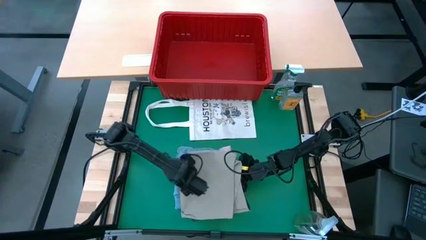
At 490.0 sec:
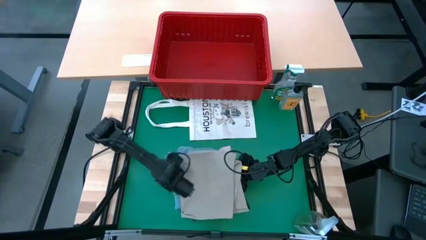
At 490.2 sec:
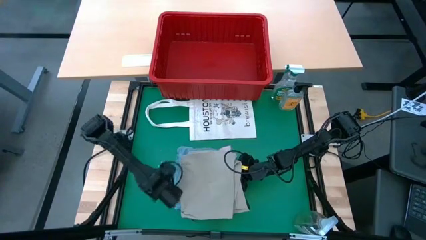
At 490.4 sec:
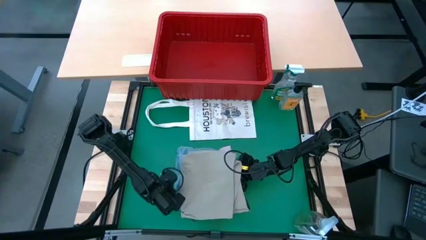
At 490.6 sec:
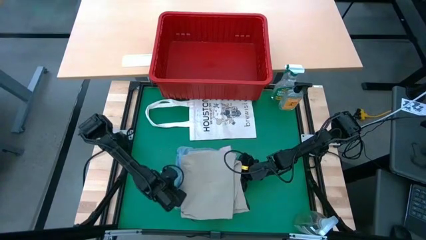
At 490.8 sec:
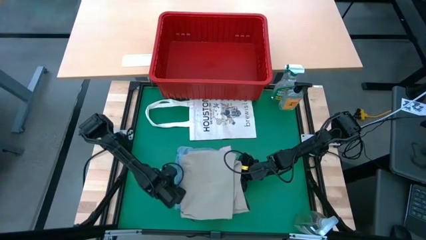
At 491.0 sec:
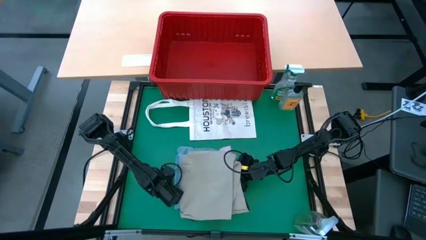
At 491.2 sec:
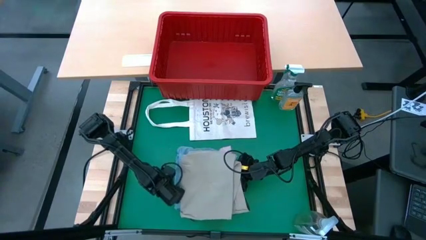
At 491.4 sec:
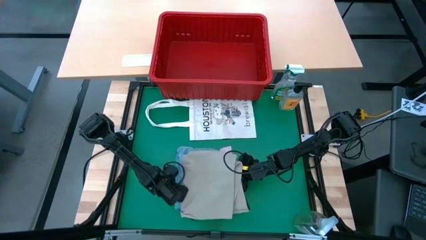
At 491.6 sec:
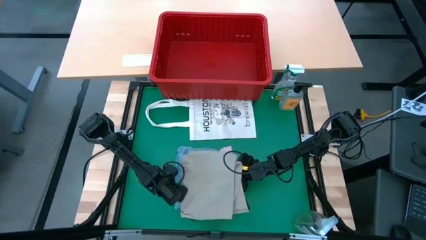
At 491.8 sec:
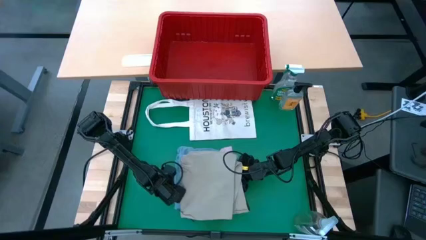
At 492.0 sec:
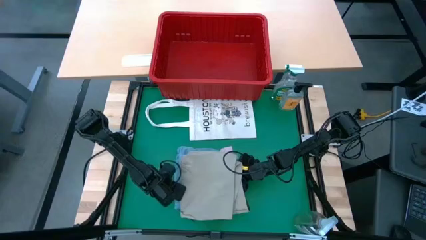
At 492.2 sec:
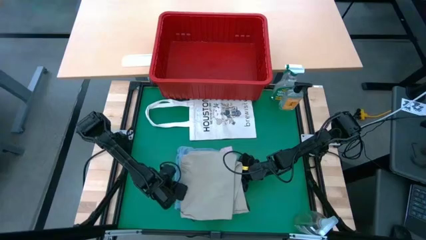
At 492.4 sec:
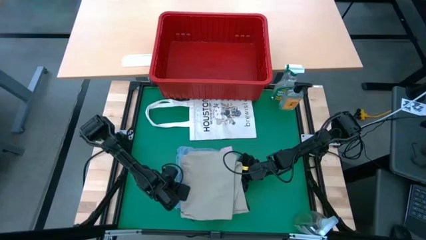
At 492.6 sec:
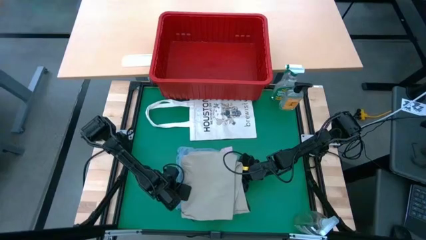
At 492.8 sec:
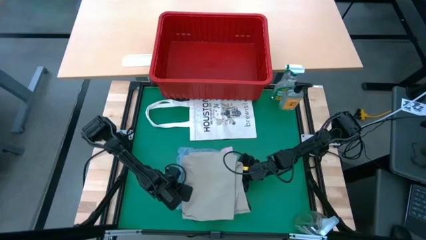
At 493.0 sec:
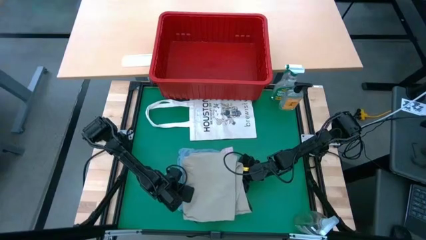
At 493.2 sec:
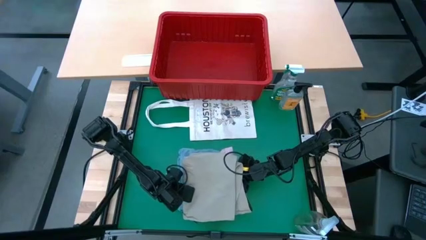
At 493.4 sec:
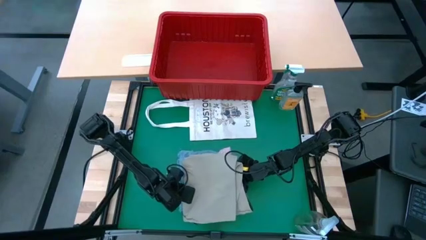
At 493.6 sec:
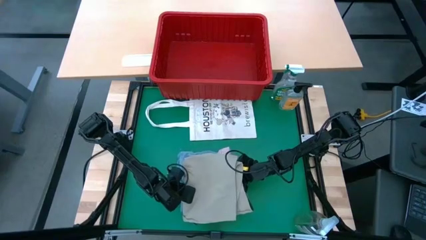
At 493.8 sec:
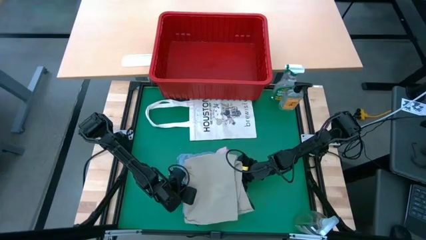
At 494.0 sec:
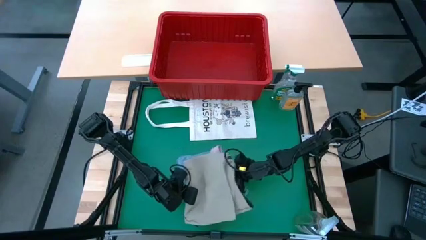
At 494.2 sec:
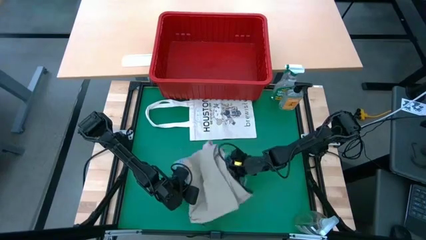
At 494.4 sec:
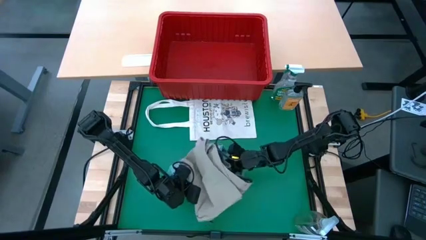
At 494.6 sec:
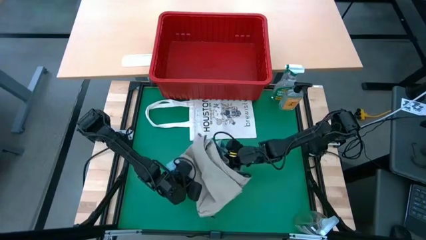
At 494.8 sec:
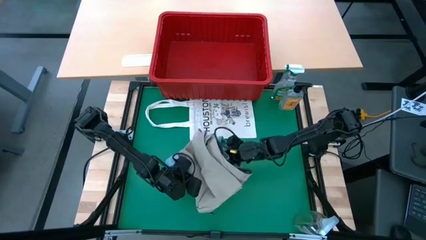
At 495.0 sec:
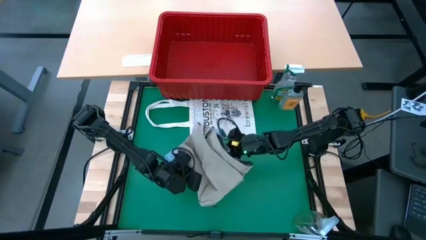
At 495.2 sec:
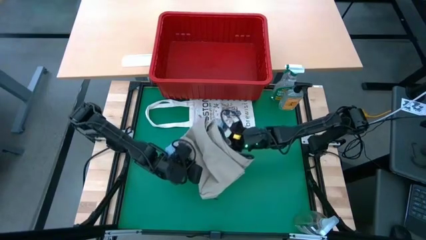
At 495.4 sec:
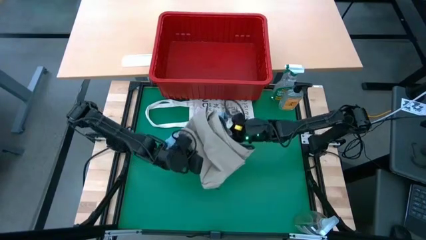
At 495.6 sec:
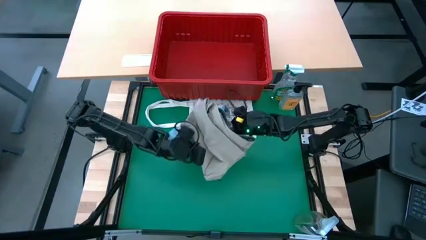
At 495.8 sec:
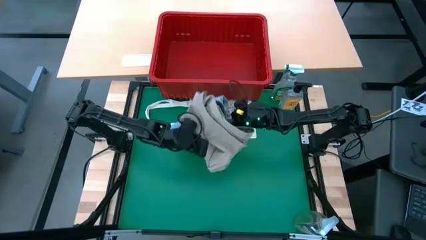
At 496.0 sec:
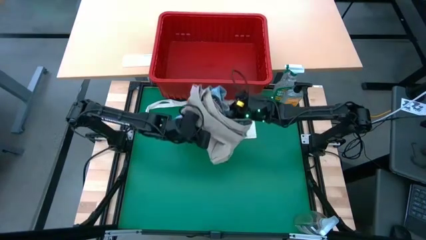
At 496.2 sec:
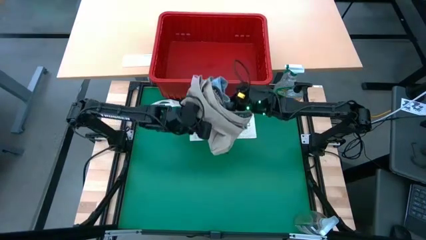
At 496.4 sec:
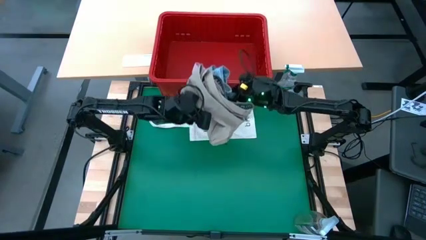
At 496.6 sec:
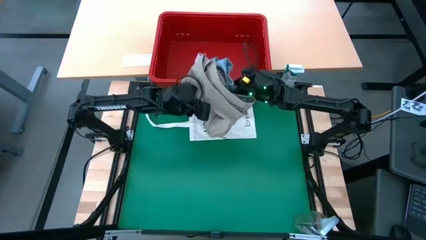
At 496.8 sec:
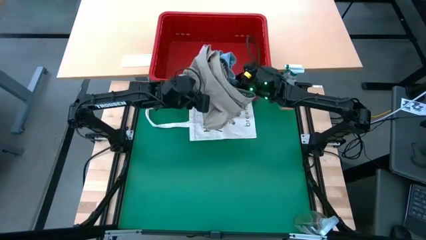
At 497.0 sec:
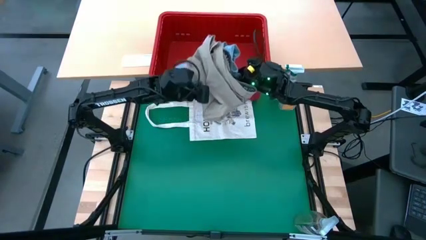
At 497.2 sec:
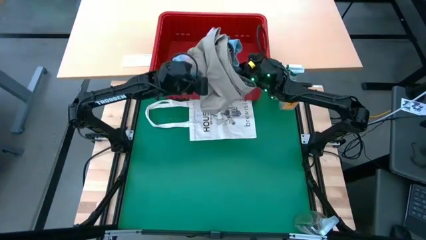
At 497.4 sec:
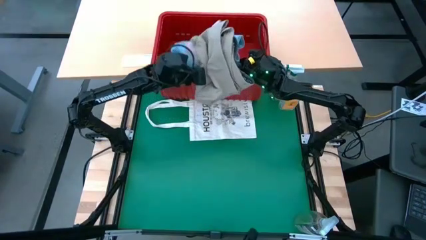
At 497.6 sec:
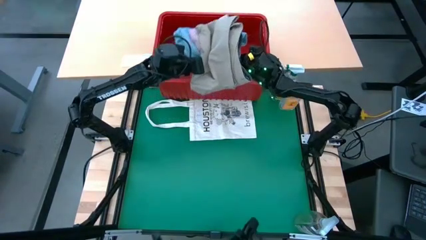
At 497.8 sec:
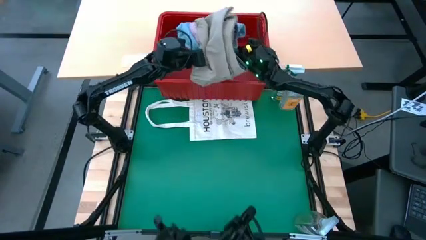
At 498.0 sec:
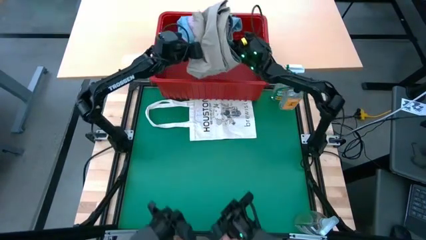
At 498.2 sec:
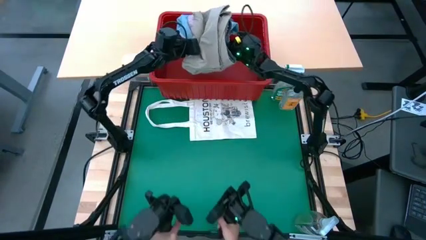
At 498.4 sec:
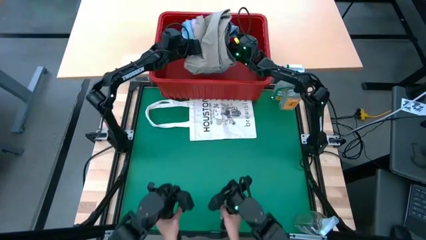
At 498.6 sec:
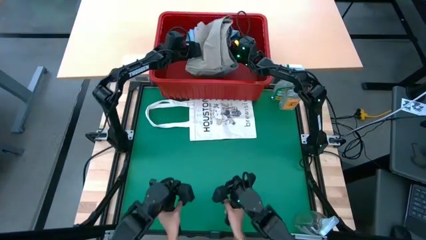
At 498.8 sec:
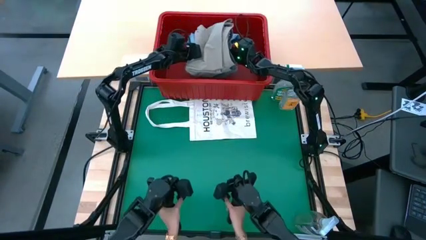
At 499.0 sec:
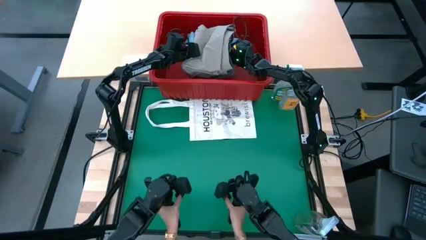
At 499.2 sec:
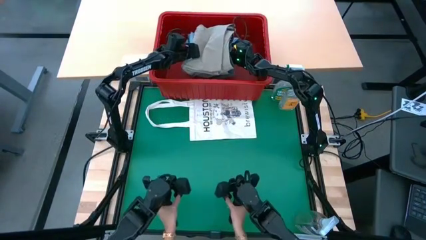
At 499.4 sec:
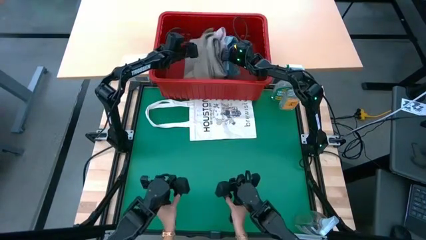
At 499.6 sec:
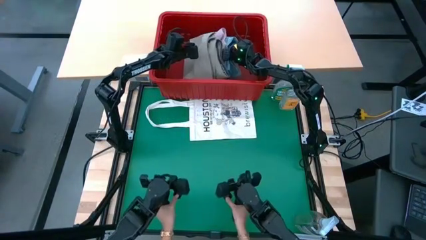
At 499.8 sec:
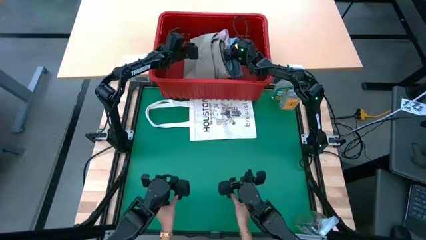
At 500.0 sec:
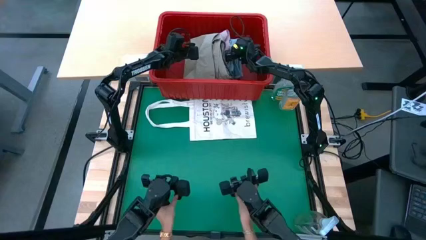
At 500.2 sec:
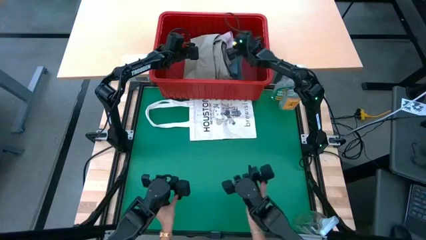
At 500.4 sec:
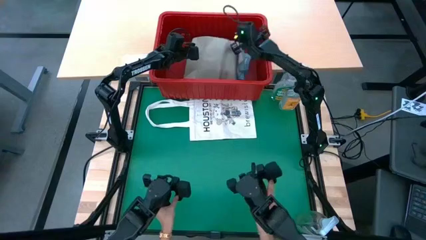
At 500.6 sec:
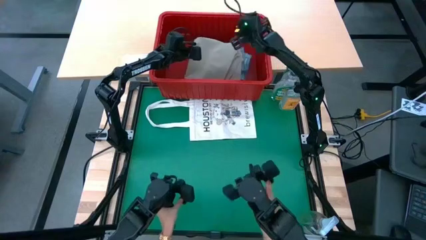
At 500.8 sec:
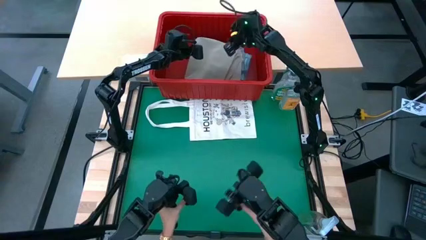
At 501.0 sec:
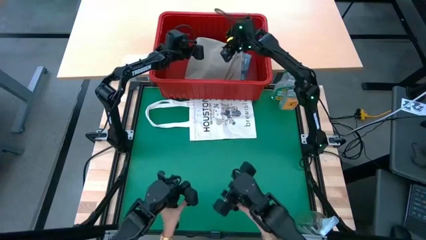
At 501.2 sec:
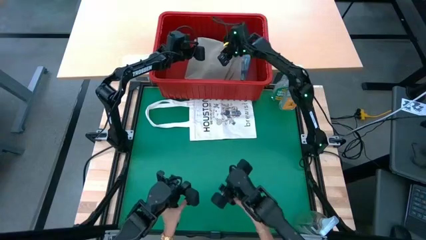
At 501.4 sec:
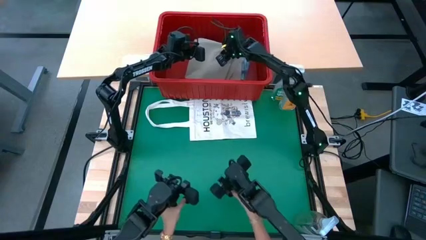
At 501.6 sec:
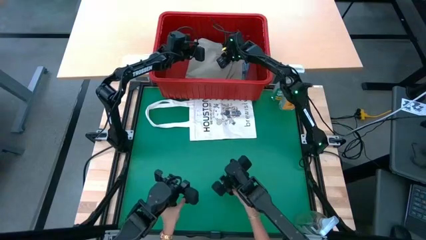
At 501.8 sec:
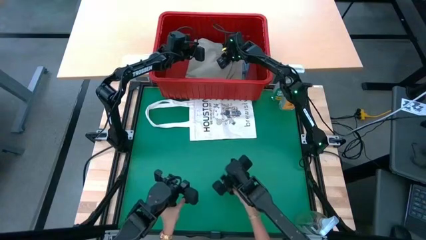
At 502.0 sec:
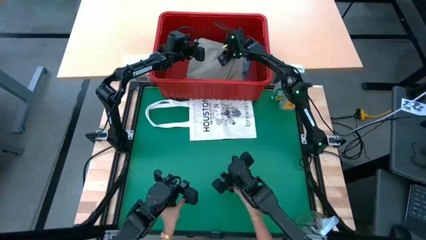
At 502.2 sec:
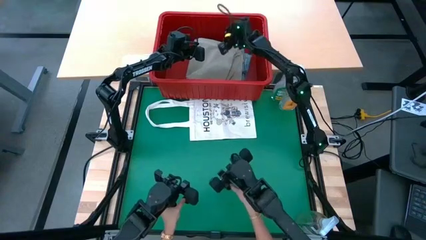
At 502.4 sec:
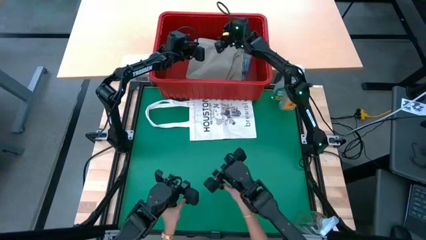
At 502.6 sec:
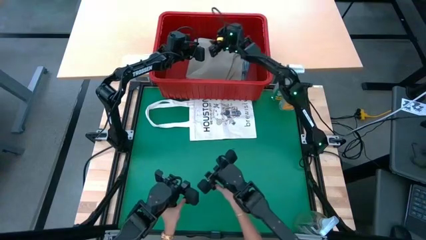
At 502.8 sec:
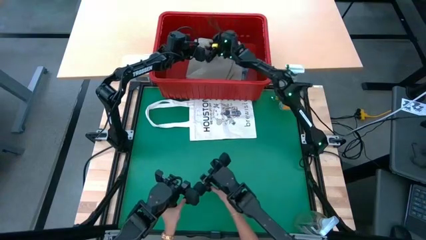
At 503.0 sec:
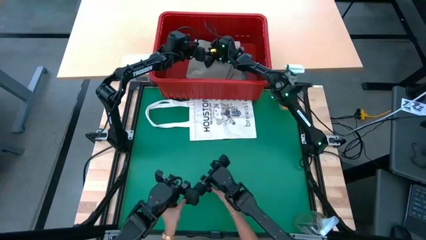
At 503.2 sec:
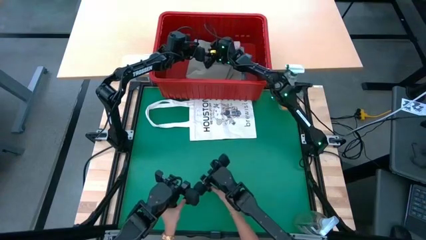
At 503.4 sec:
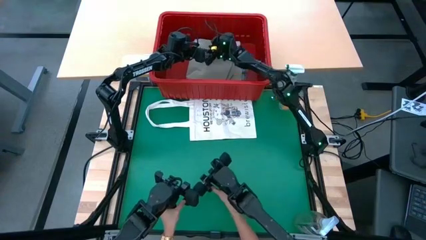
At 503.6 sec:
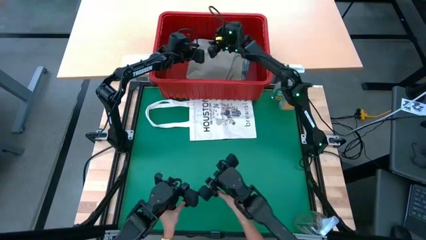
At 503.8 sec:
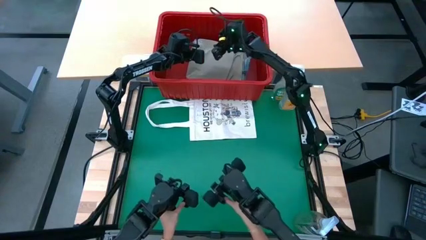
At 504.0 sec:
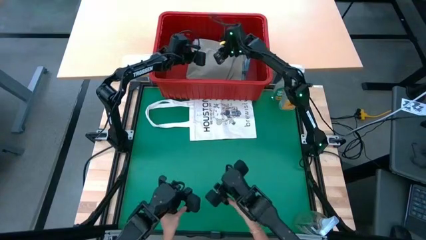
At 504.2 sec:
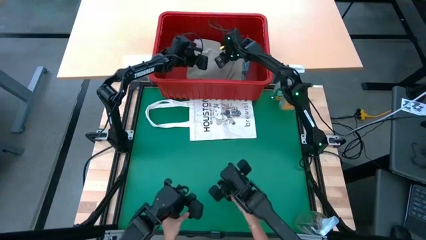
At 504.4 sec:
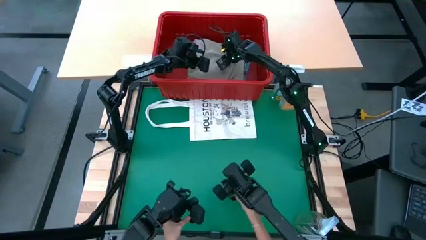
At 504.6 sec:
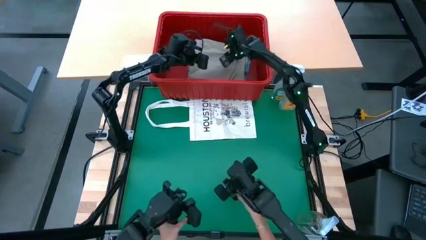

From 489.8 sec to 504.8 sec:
Task: Fold Laundry from Bin
Put the folded clothes into the red laundry bin
